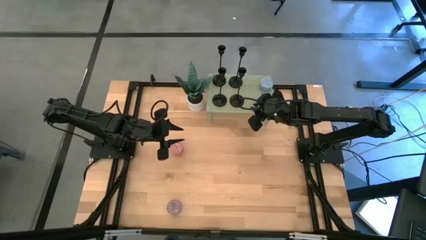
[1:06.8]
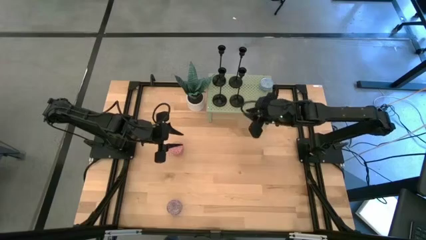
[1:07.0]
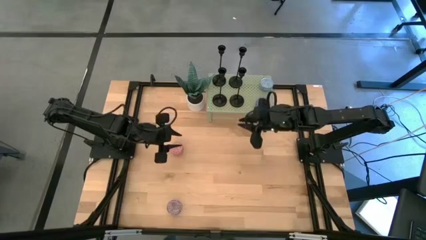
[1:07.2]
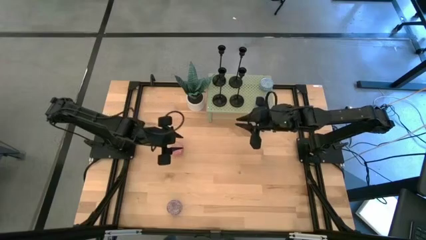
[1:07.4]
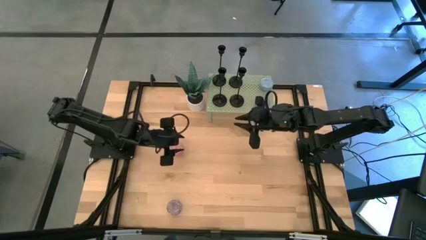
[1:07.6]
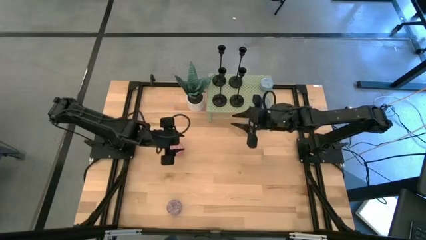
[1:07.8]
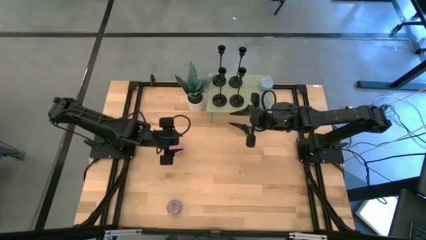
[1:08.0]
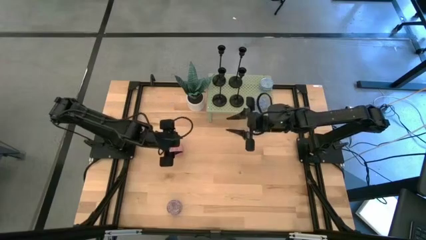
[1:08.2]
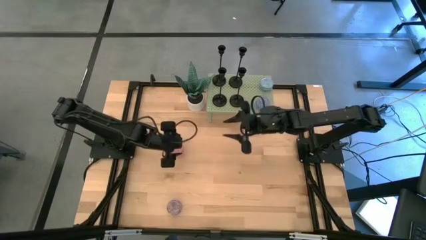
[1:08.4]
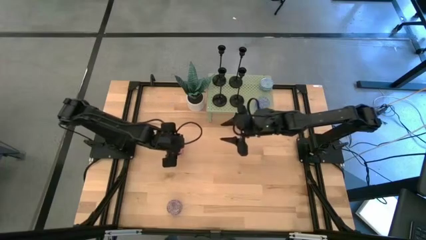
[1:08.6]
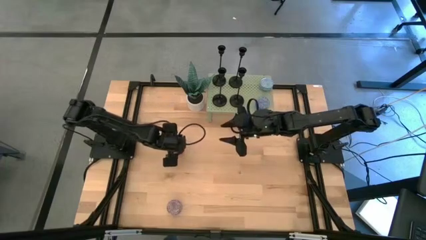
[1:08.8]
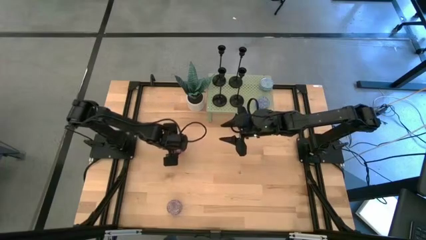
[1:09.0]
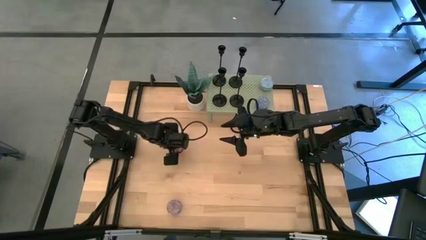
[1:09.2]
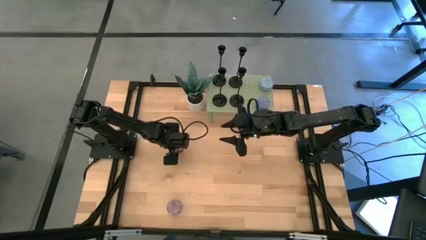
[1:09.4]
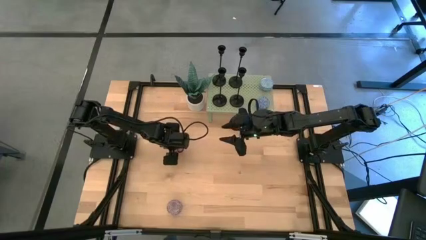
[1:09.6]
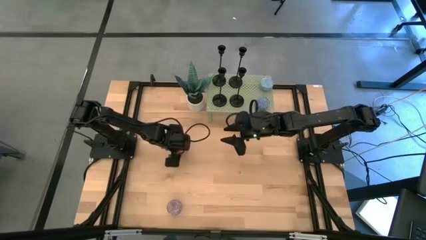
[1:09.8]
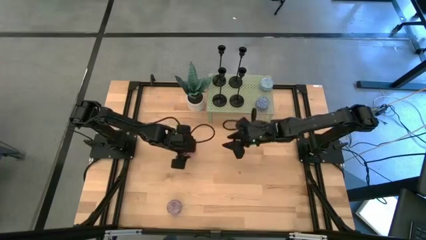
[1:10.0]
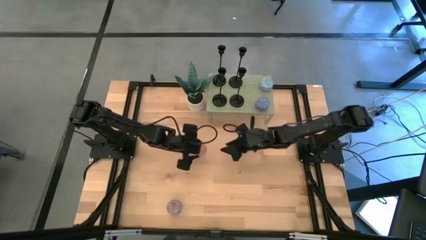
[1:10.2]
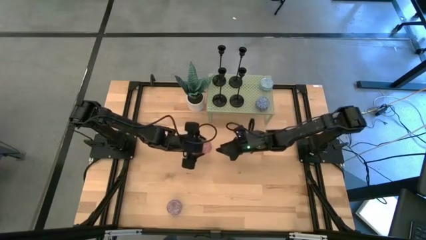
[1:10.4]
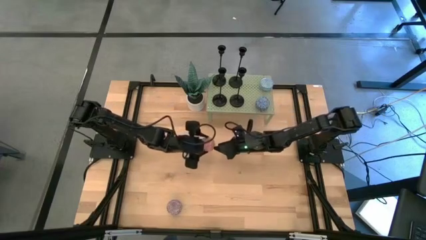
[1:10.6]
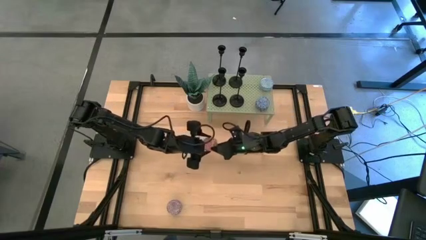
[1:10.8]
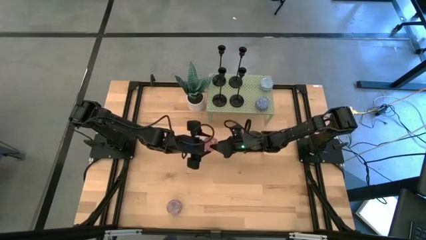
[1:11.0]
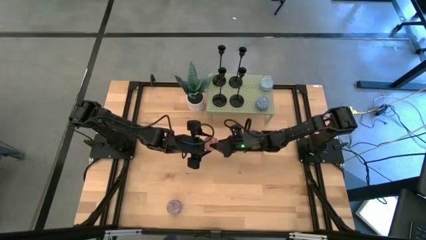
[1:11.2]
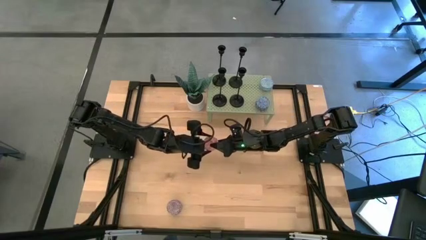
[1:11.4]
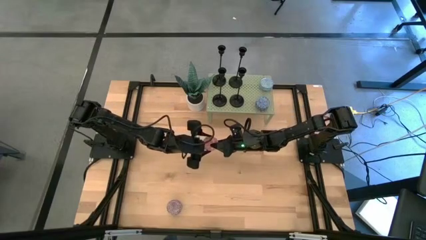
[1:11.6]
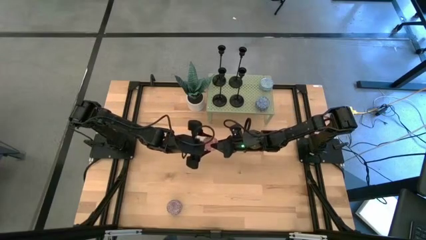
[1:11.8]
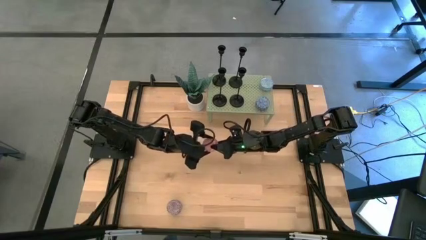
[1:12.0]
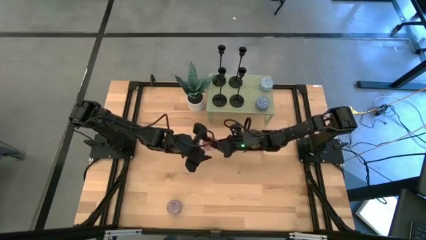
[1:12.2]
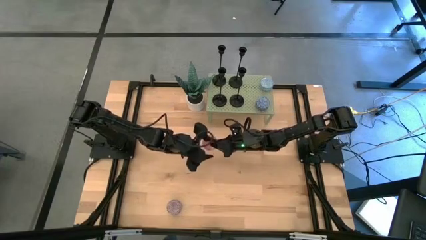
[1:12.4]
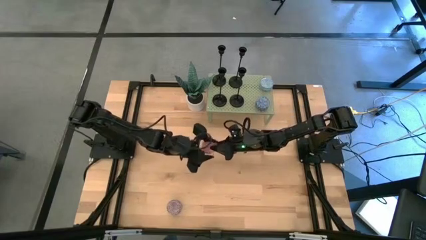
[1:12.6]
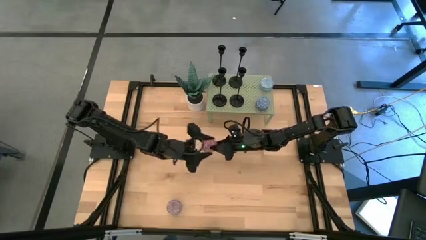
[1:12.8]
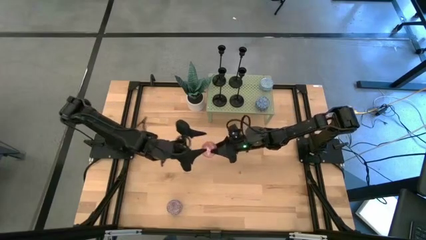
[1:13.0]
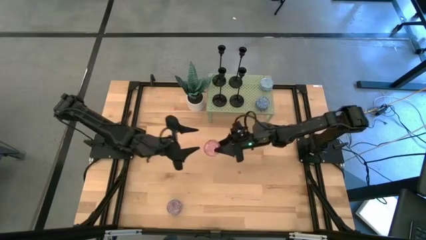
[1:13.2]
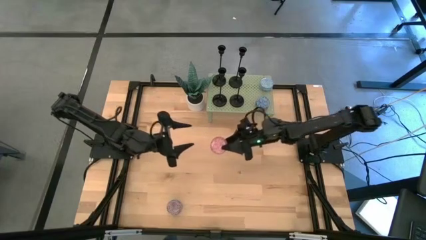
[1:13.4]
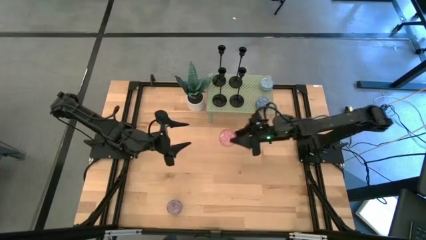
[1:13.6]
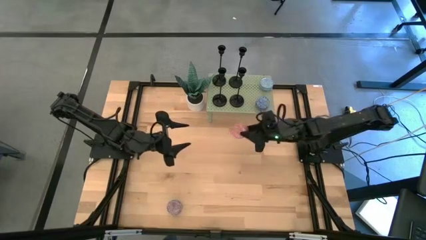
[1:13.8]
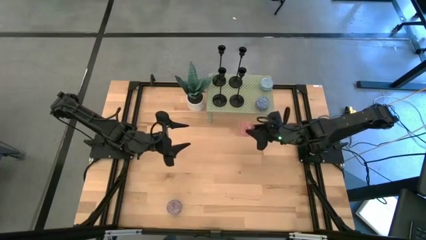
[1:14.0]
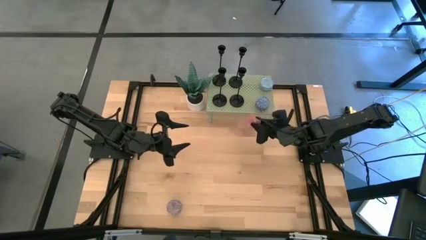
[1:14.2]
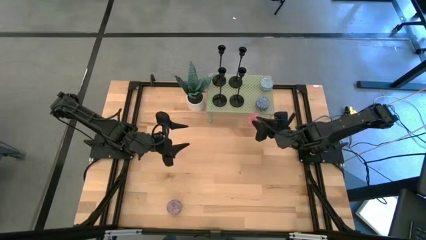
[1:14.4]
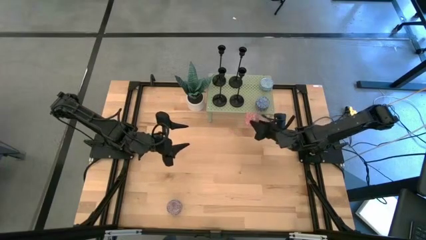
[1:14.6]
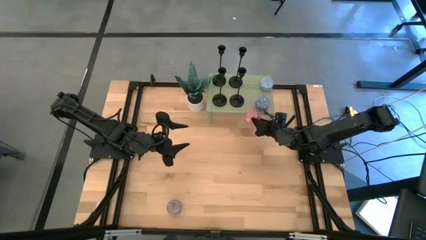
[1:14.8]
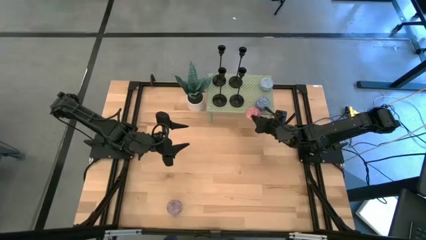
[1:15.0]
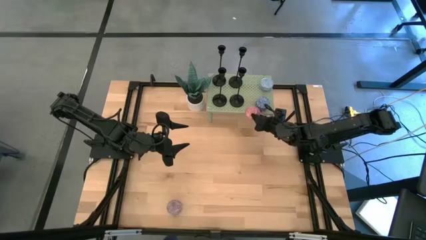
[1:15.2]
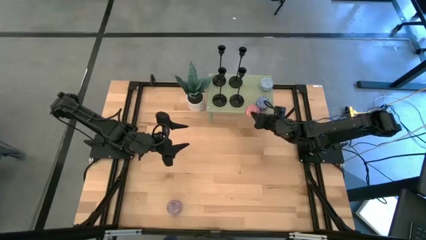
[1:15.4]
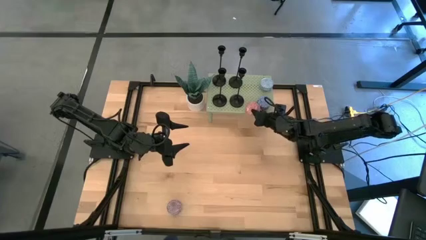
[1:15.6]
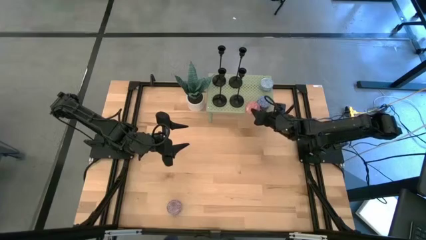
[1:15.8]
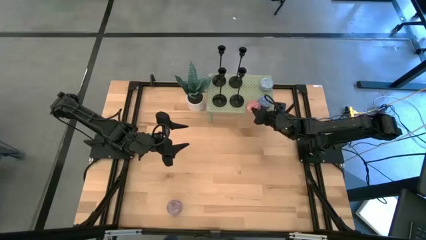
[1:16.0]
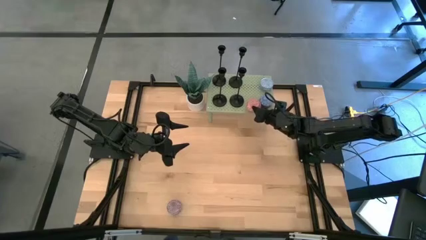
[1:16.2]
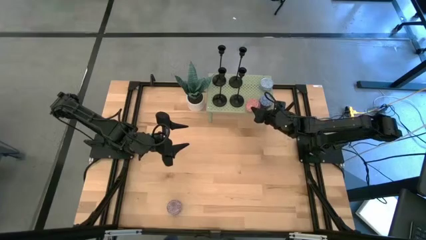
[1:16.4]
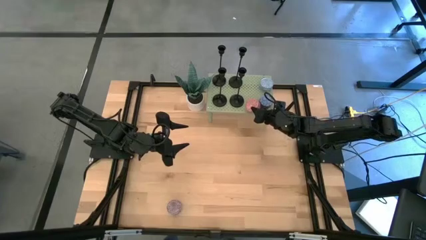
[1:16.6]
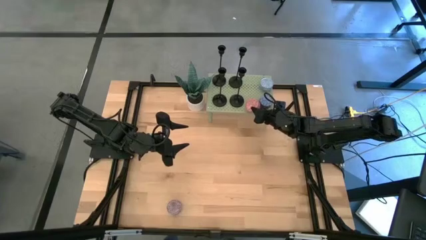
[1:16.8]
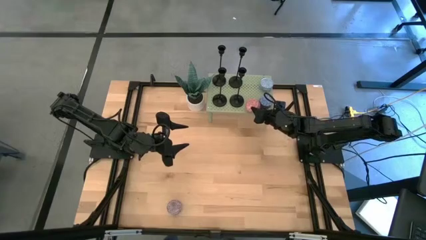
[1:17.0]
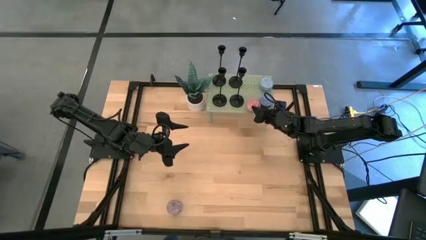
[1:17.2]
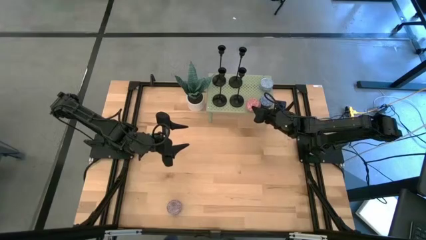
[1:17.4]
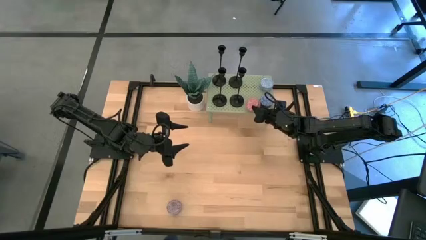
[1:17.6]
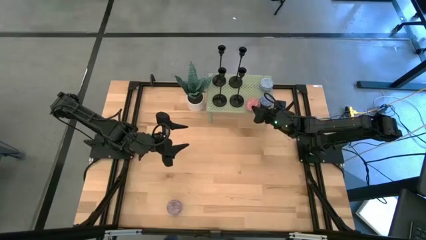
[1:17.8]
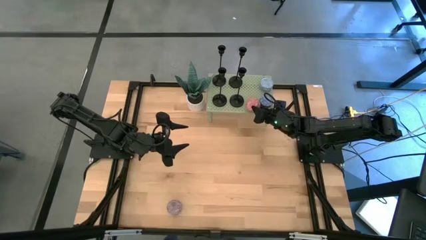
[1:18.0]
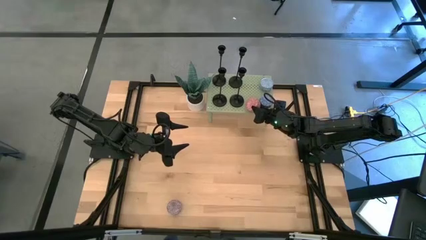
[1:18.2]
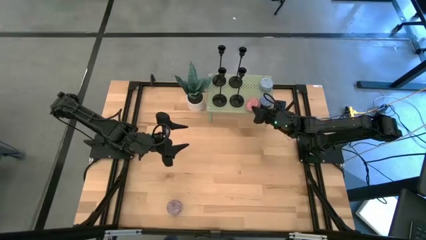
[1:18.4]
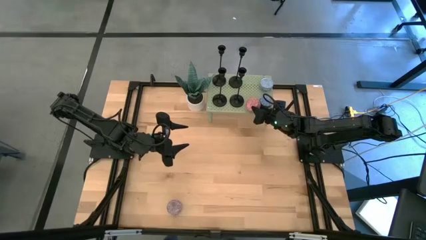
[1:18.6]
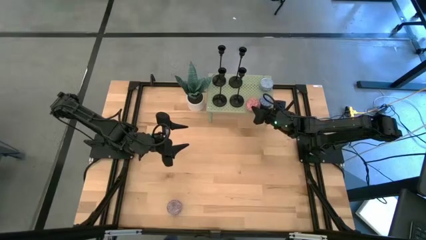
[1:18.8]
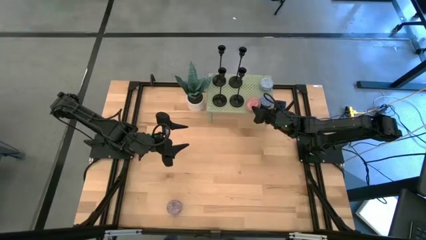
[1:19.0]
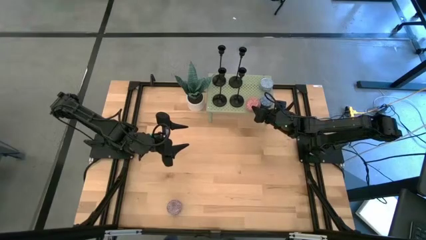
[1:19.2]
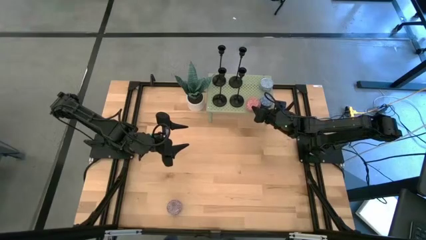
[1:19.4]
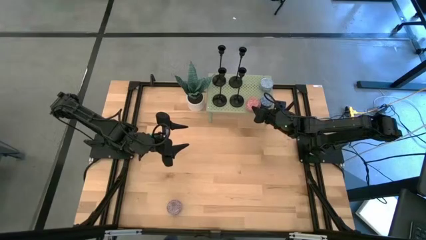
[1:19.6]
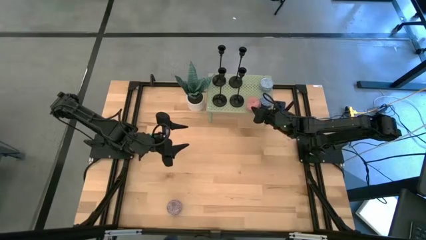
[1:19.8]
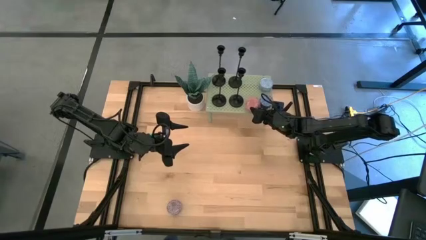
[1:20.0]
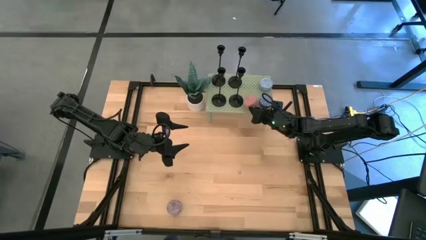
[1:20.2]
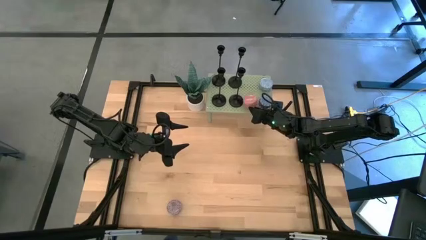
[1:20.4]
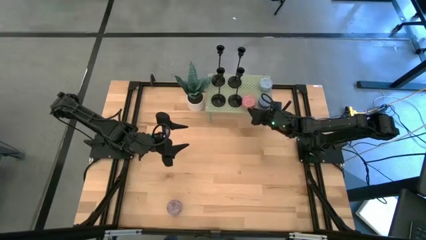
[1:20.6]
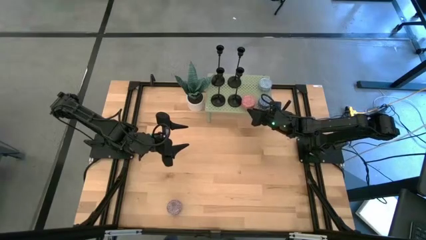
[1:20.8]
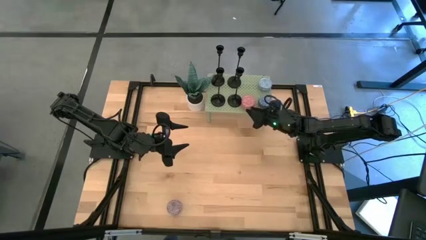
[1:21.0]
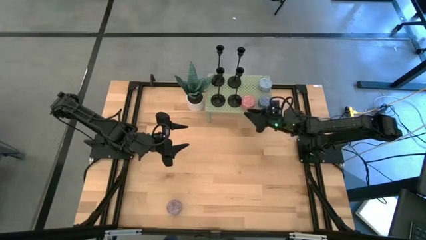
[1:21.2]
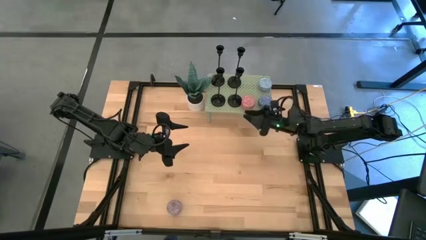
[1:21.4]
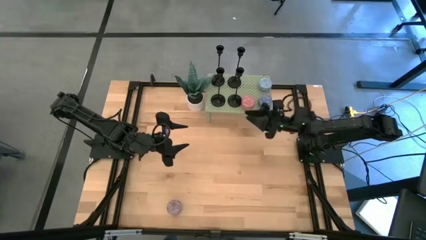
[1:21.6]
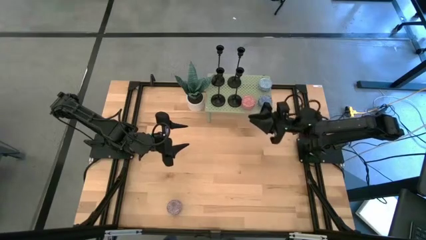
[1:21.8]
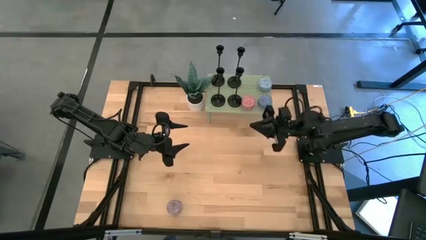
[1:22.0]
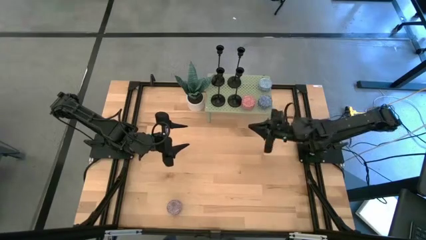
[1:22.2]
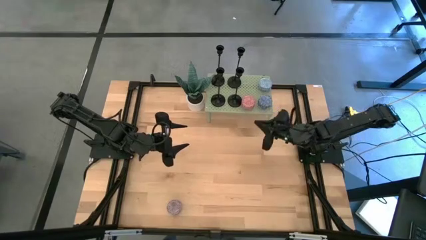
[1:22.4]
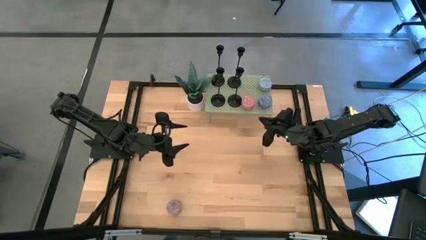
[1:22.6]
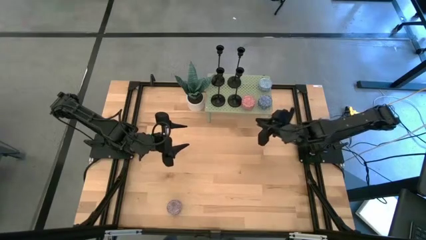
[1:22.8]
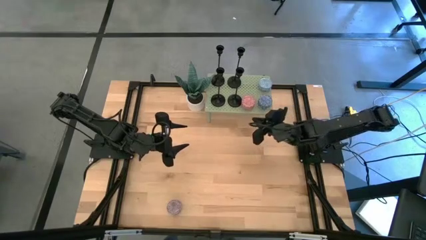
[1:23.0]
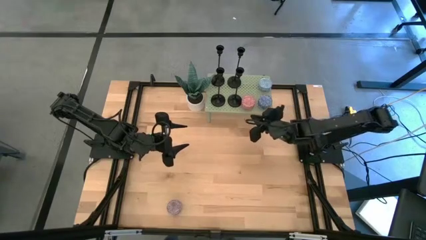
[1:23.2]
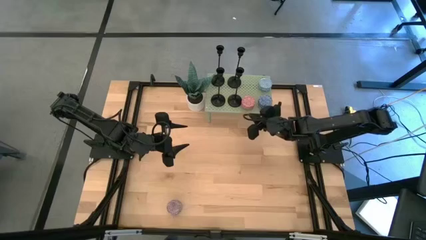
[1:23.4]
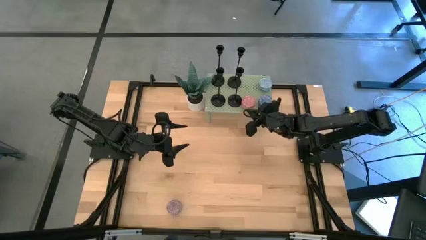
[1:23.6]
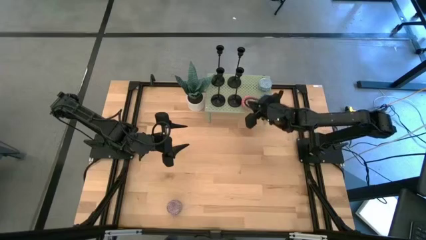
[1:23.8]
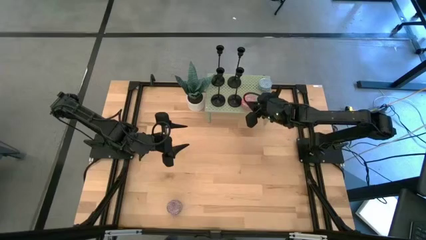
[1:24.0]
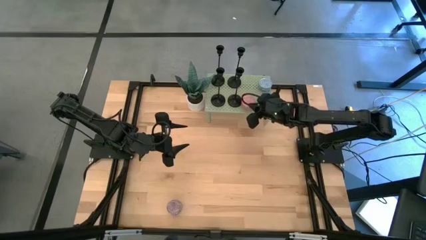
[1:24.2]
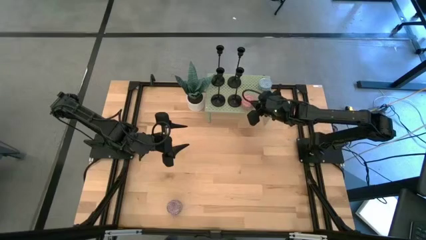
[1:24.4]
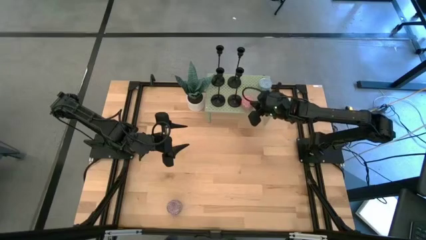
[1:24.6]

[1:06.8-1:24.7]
Task: Pick & Place candle stick holders
Align the pink scented candle with the other blue scented candle on the shelf
